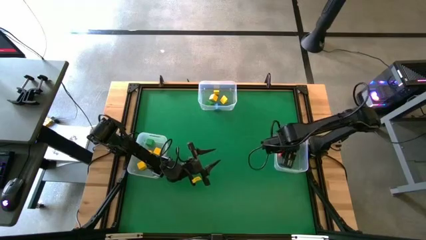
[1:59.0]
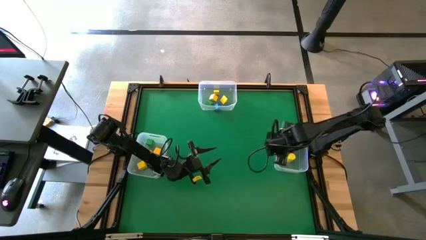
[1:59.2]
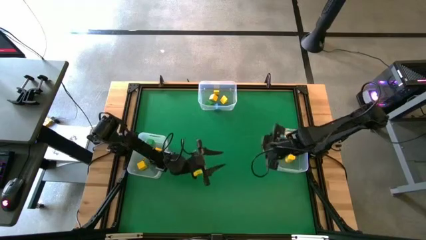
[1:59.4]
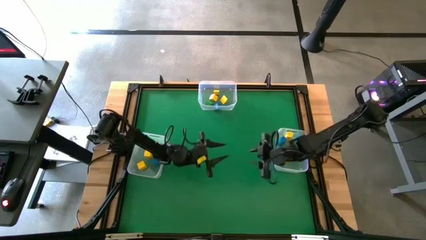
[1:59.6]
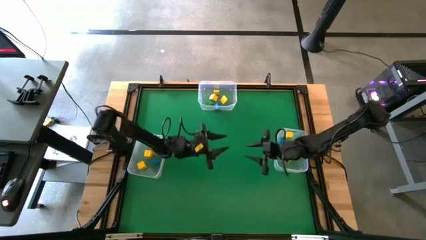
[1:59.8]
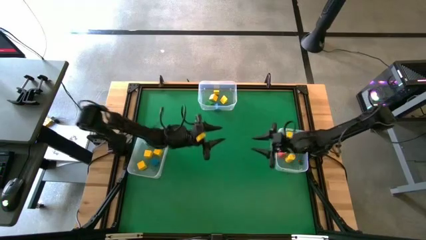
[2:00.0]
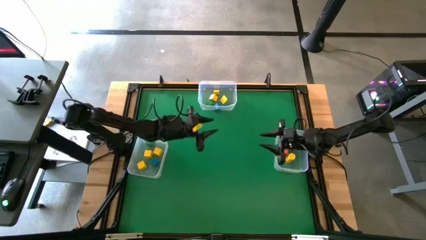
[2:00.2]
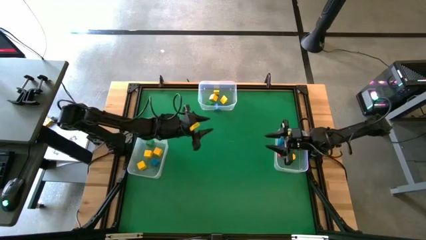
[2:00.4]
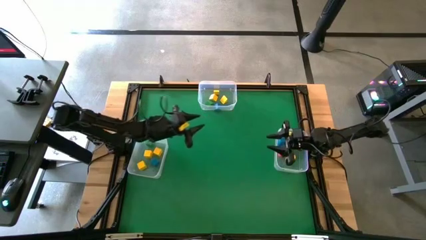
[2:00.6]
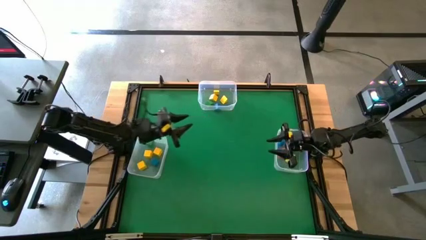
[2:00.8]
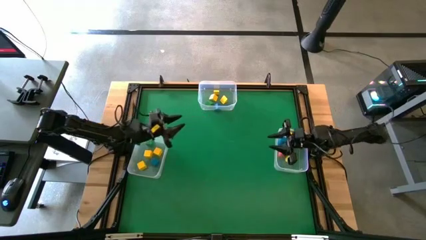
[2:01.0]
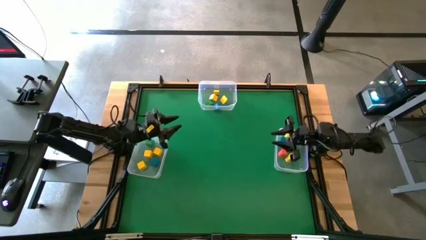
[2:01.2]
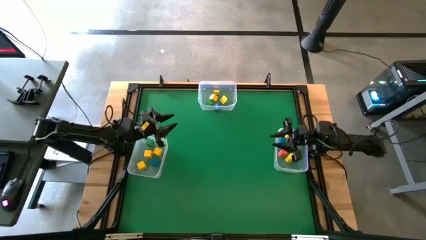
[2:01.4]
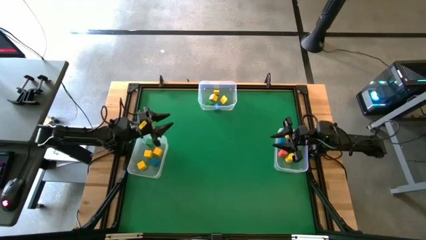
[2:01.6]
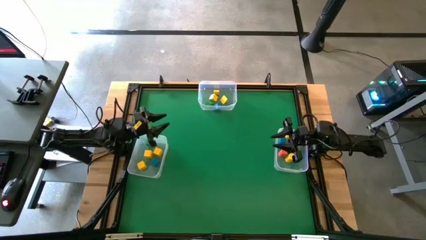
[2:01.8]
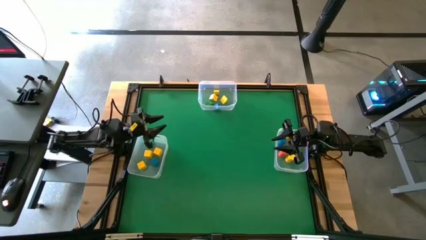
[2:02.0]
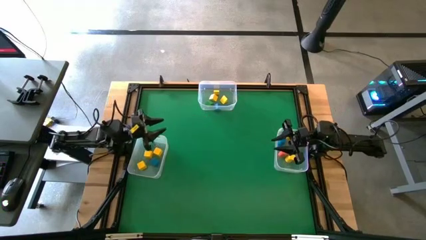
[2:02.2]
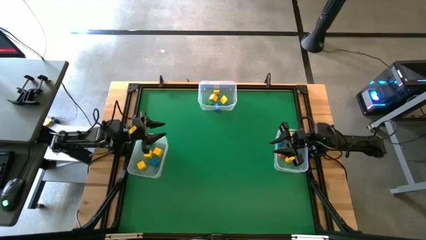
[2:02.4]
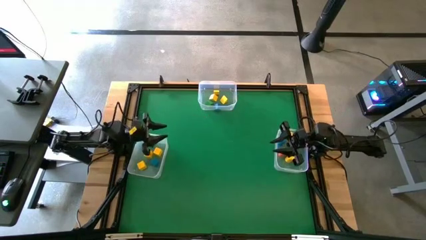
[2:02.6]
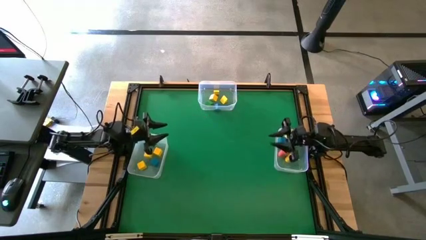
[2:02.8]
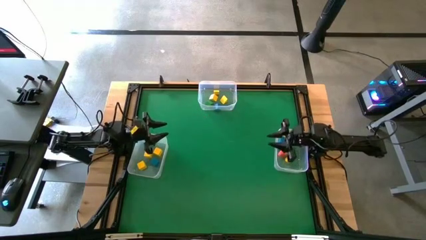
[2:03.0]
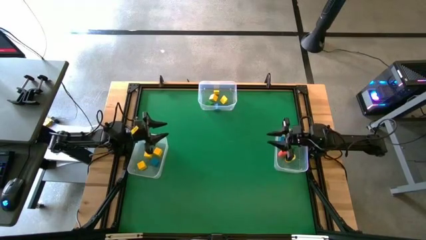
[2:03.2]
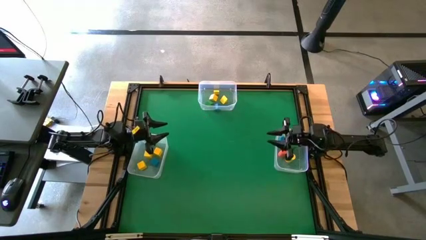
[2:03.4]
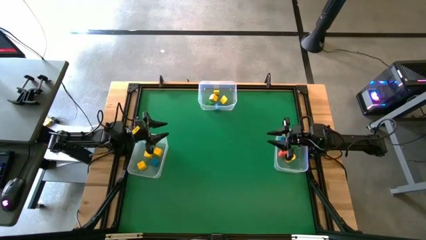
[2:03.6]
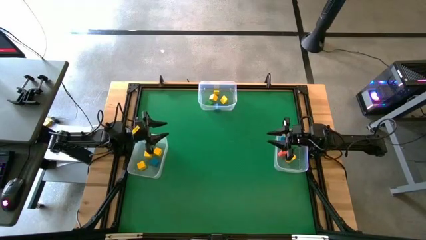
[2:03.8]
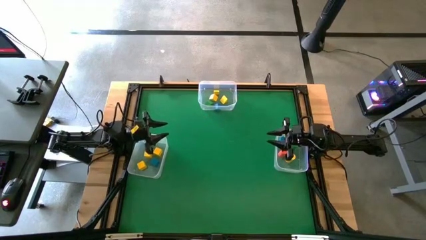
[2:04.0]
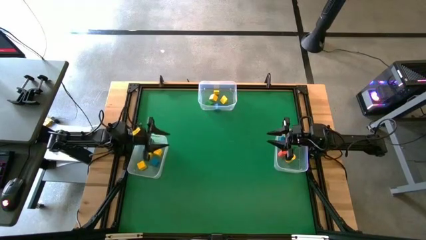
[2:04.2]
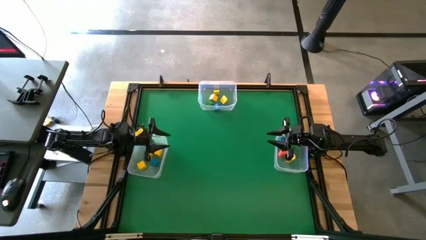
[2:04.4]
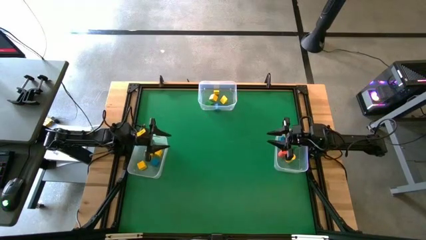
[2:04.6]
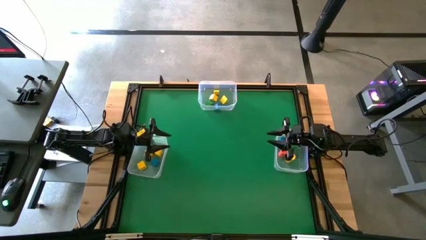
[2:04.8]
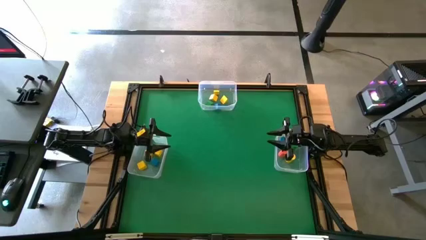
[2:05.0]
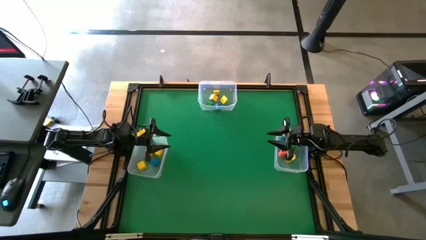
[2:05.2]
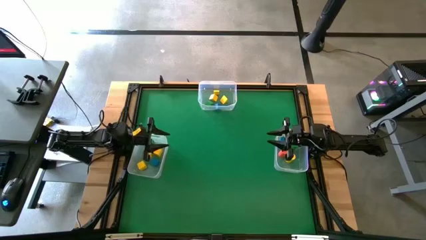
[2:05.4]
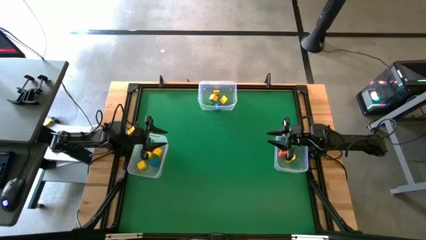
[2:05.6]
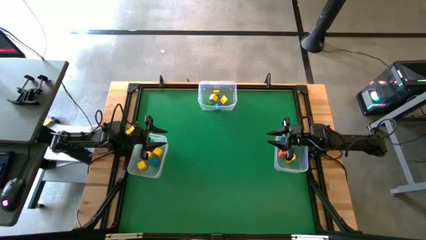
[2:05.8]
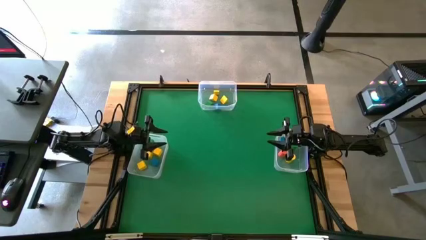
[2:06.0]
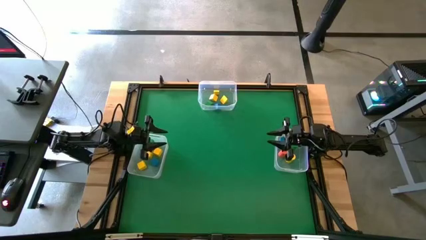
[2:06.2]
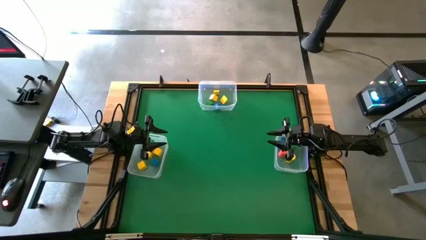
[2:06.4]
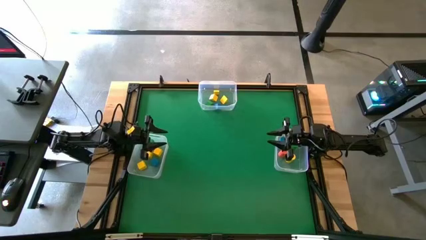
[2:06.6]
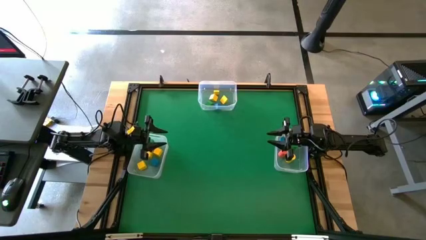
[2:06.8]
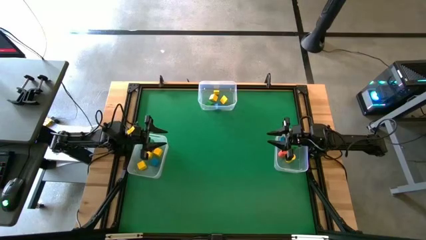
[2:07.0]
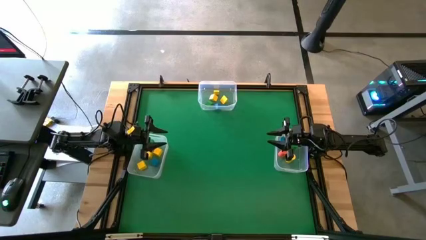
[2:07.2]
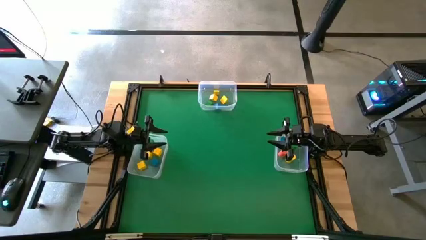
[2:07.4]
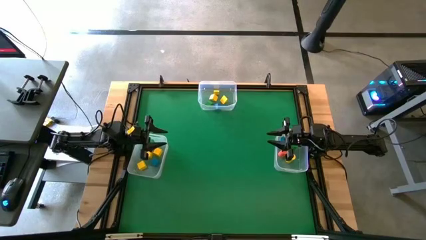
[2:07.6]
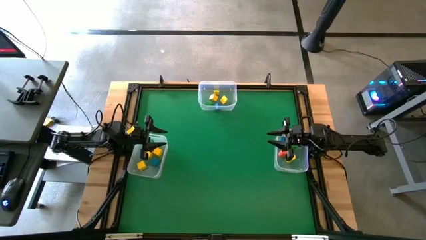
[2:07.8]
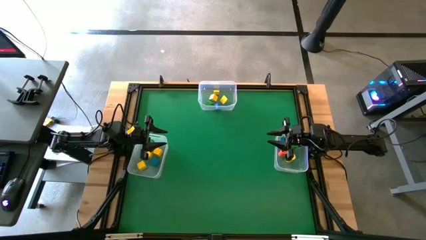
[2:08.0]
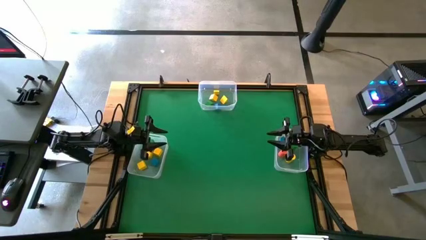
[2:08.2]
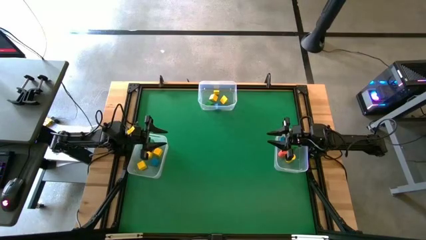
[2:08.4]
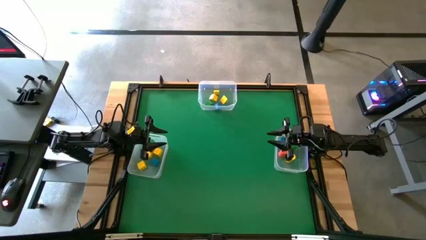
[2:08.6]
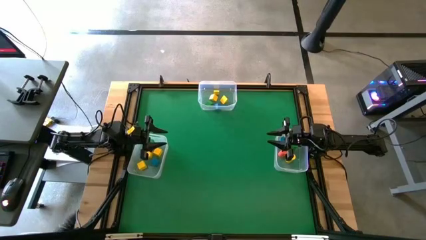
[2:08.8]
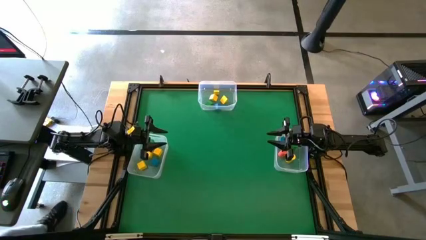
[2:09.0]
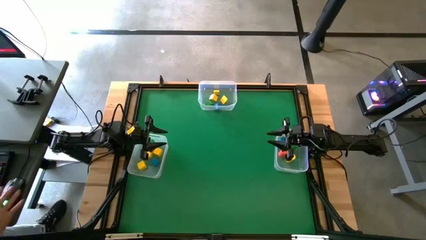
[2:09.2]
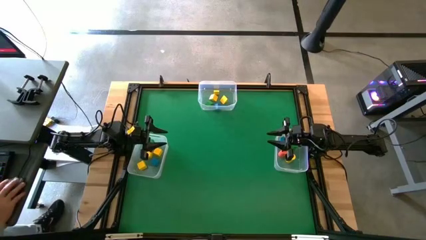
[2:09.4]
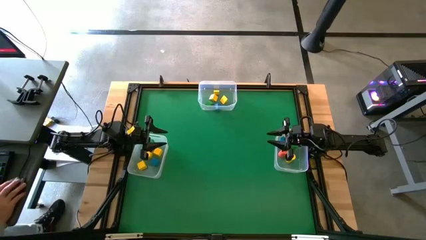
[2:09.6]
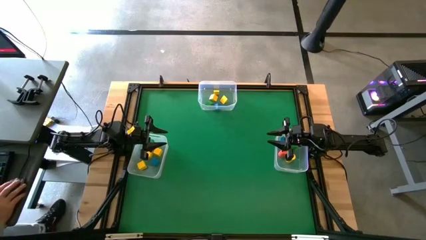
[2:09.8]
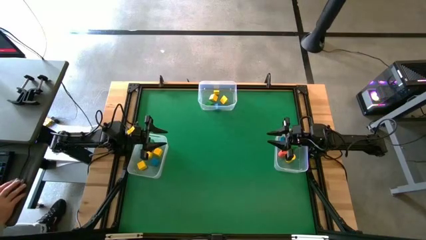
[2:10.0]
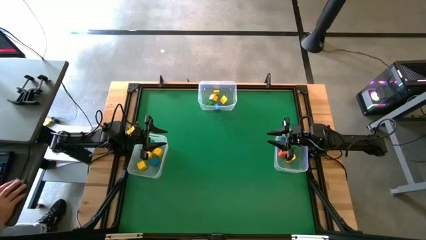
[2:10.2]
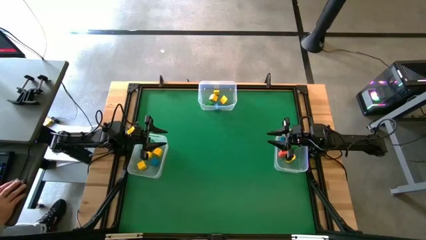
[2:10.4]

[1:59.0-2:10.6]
Task: Sort blocks by size
Return to Home Position

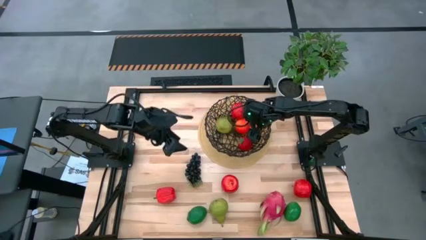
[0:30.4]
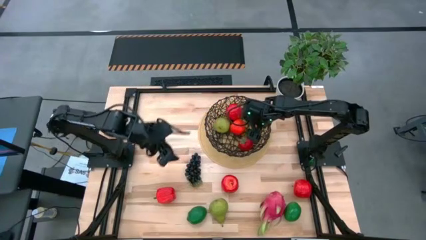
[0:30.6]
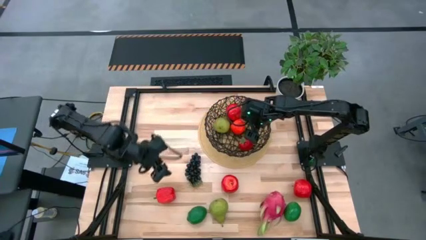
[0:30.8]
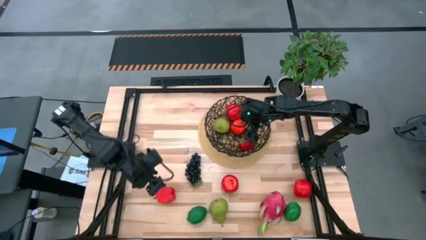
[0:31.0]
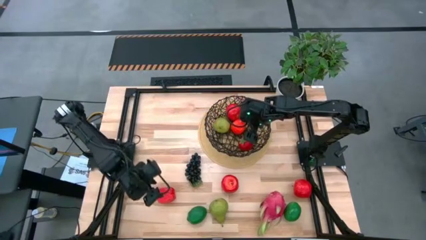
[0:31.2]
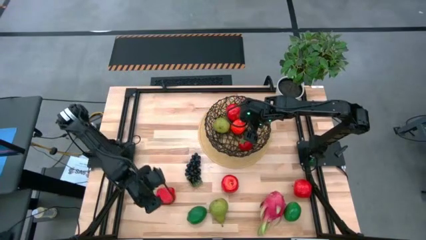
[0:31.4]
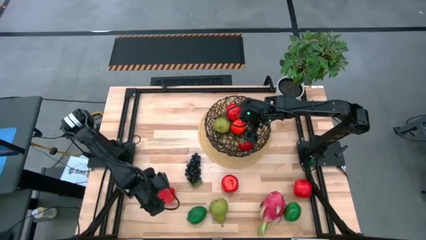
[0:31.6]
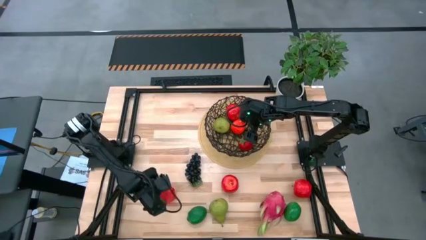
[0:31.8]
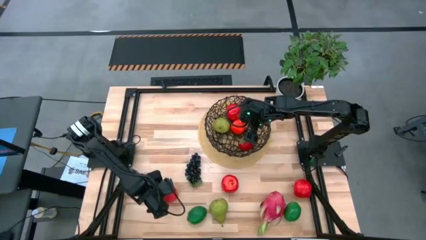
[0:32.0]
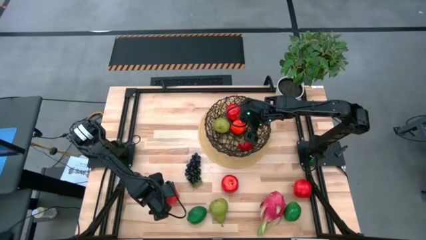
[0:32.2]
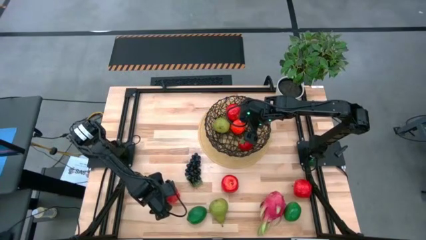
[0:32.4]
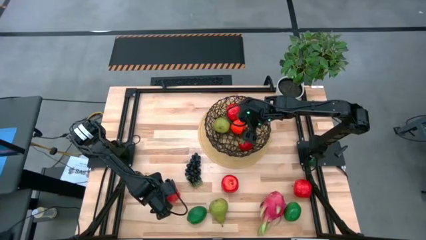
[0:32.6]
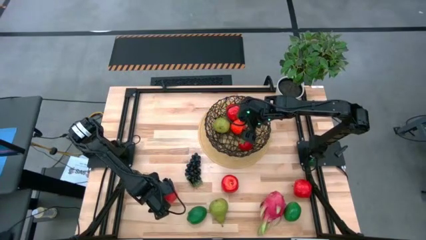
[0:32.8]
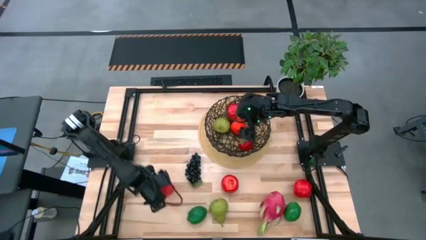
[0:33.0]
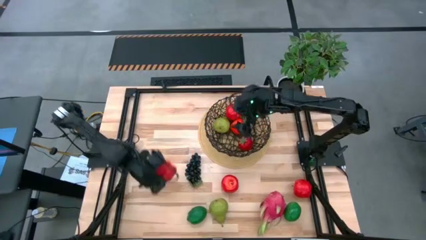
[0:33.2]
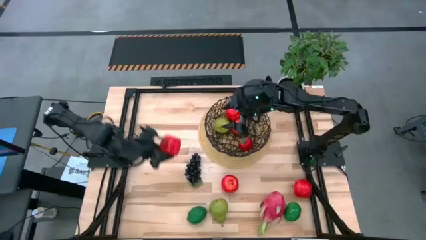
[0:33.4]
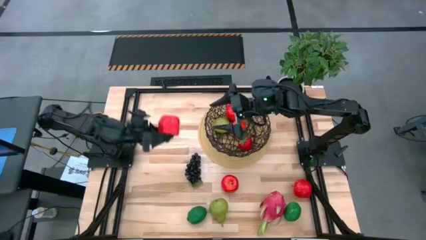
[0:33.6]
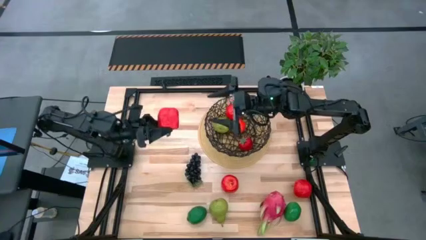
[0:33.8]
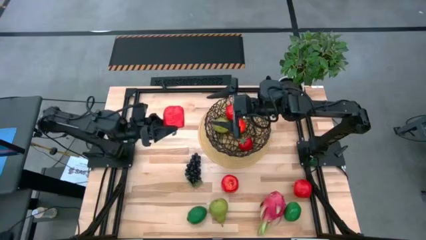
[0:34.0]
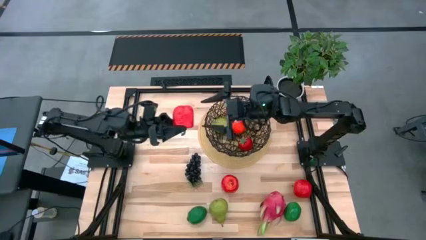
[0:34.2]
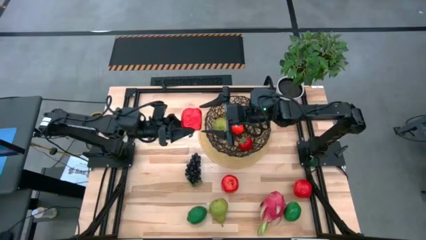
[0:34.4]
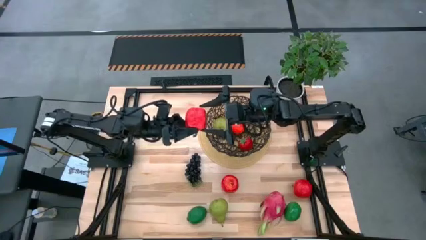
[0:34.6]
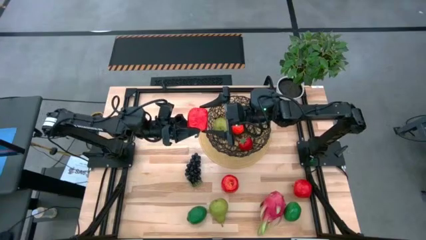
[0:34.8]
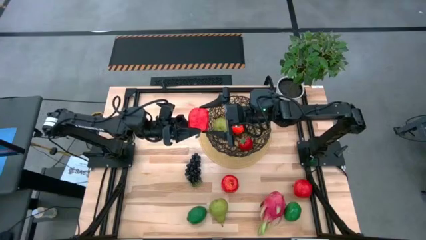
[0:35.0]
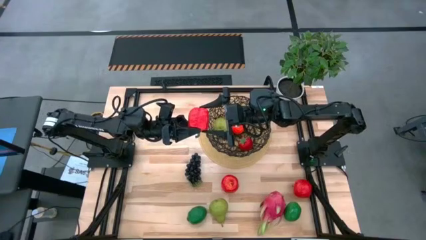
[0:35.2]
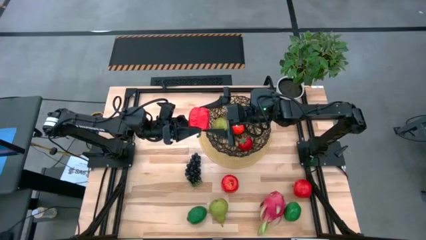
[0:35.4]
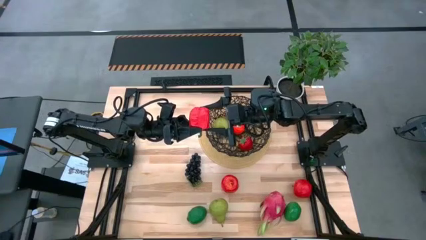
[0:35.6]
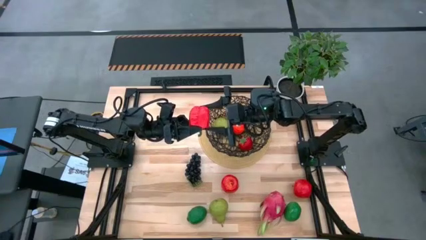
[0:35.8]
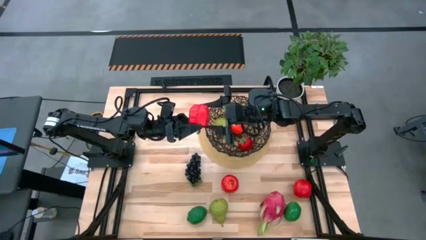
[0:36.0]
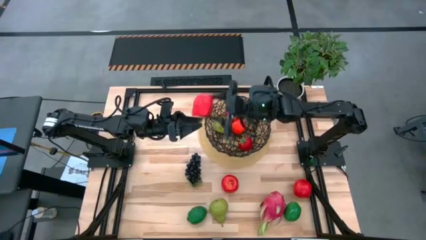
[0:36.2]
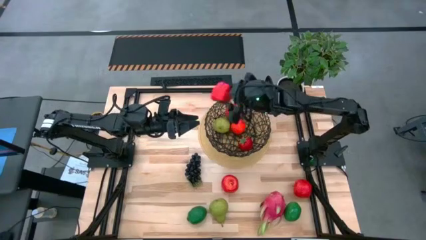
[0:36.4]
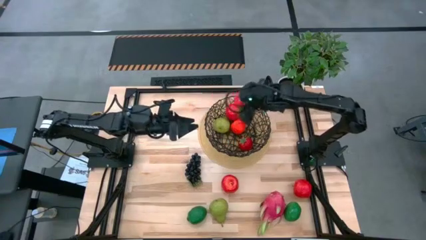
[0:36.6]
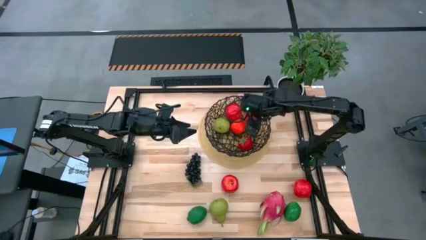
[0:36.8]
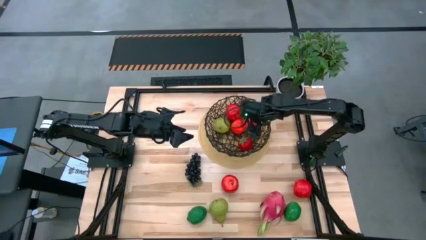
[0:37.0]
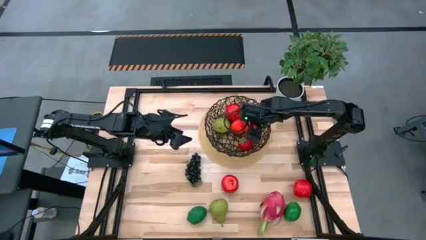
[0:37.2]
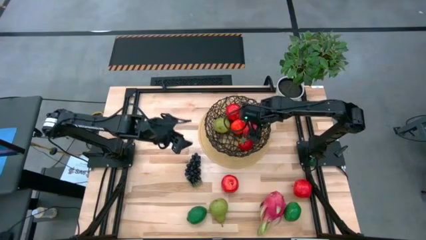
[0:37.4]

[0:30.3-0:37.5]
Task: Build produce basket
Put the red bell pepper into the black basket
